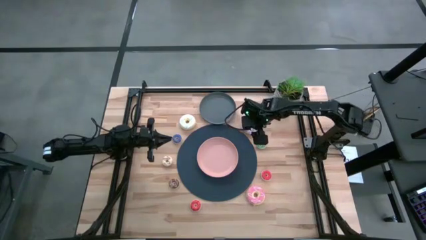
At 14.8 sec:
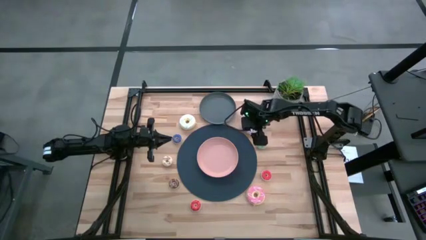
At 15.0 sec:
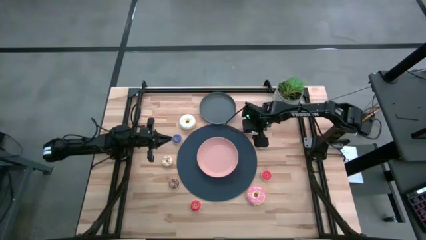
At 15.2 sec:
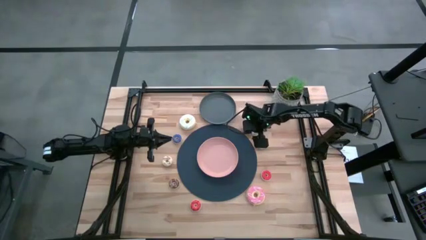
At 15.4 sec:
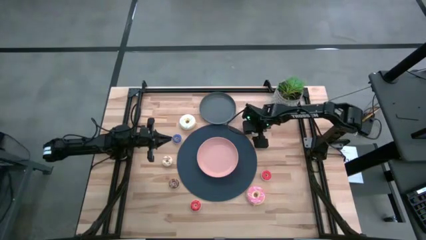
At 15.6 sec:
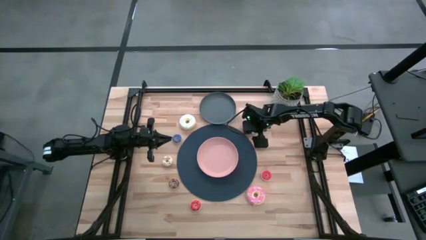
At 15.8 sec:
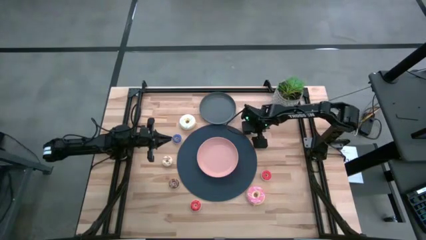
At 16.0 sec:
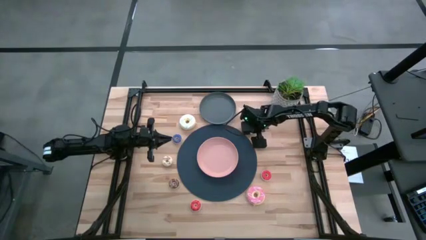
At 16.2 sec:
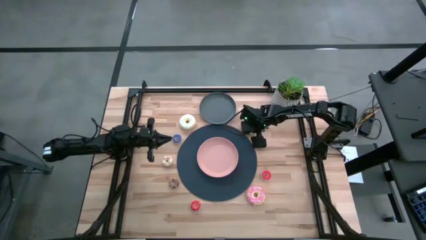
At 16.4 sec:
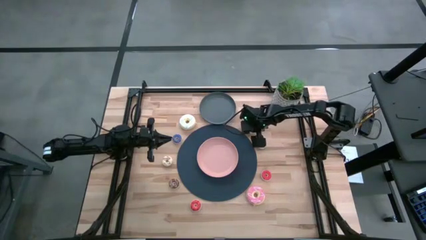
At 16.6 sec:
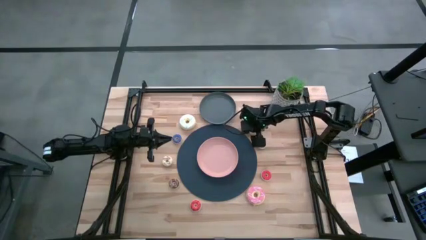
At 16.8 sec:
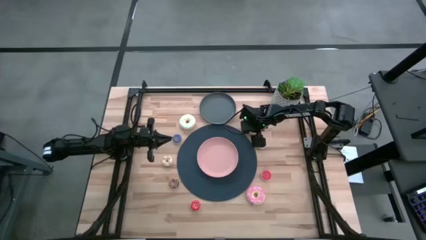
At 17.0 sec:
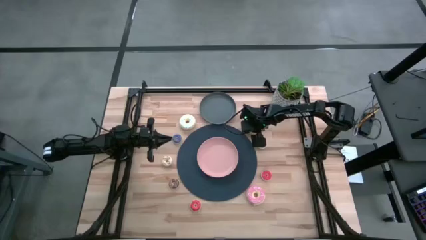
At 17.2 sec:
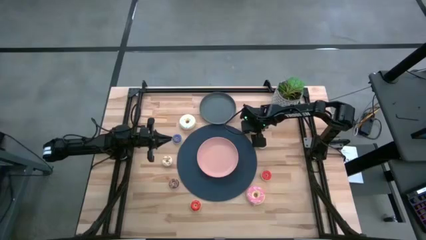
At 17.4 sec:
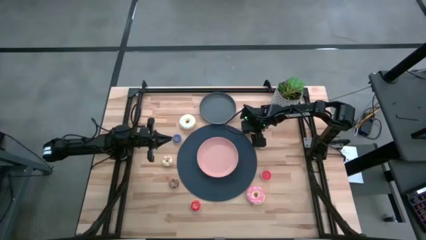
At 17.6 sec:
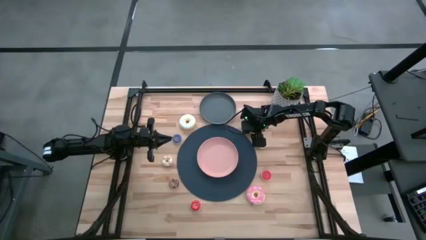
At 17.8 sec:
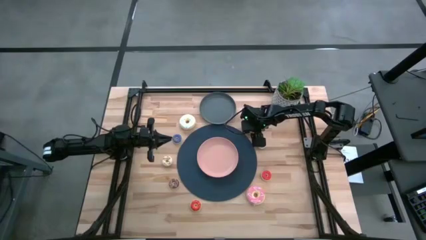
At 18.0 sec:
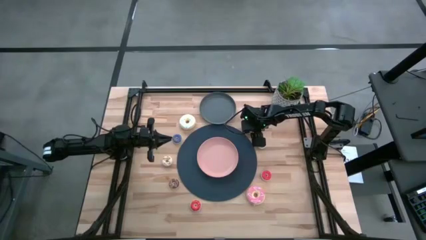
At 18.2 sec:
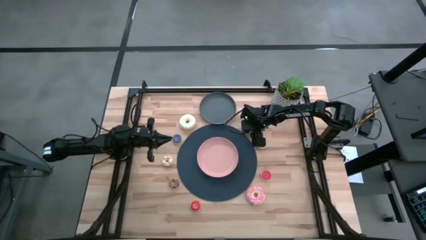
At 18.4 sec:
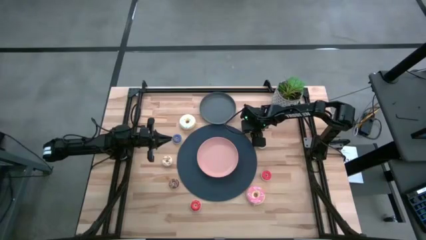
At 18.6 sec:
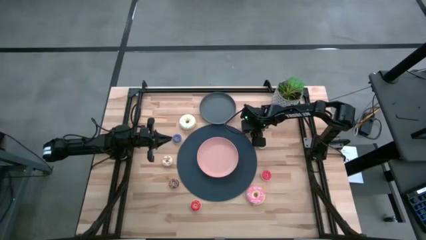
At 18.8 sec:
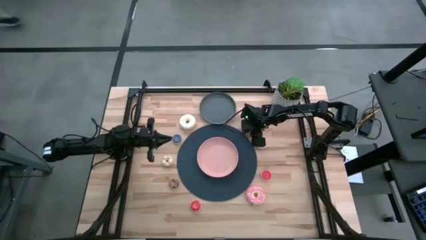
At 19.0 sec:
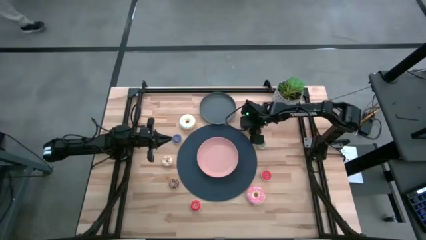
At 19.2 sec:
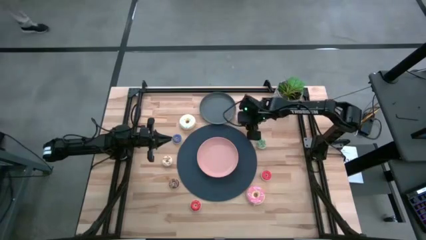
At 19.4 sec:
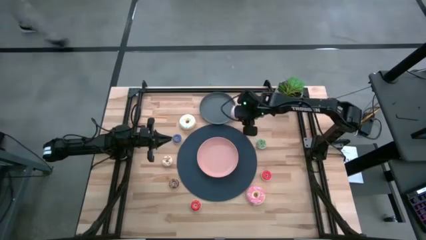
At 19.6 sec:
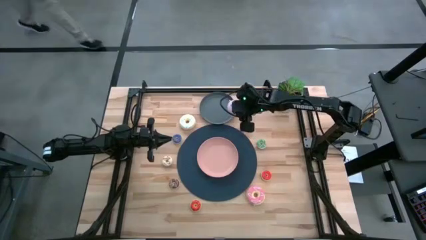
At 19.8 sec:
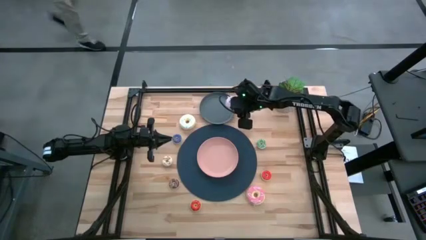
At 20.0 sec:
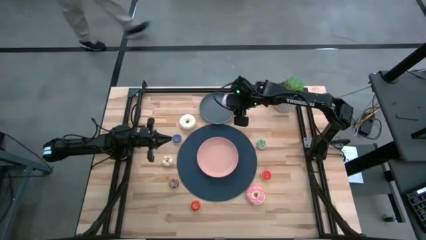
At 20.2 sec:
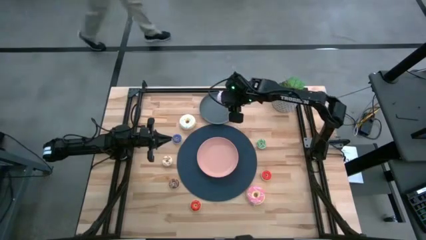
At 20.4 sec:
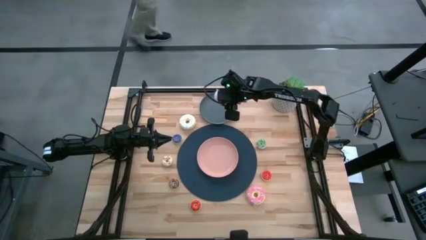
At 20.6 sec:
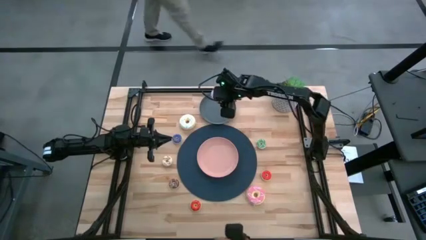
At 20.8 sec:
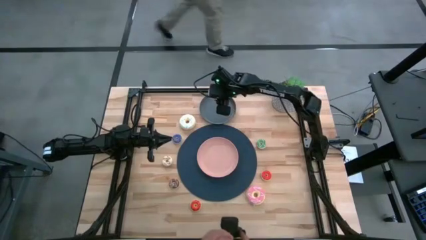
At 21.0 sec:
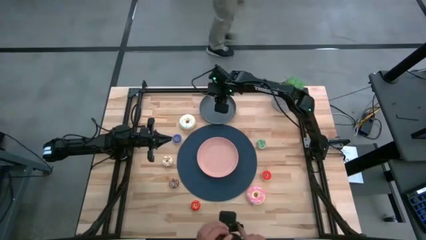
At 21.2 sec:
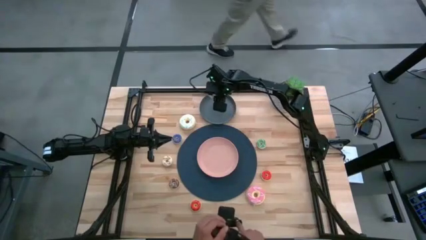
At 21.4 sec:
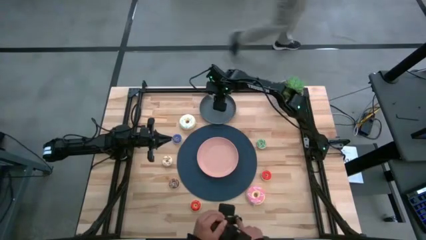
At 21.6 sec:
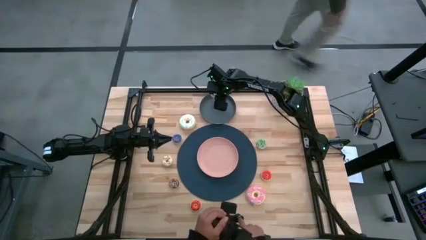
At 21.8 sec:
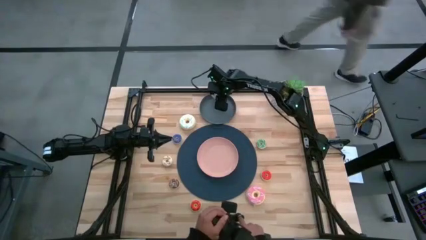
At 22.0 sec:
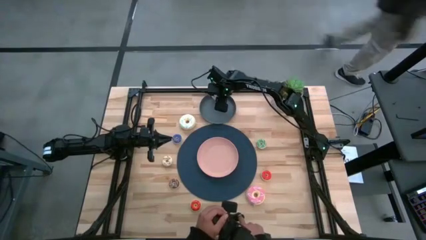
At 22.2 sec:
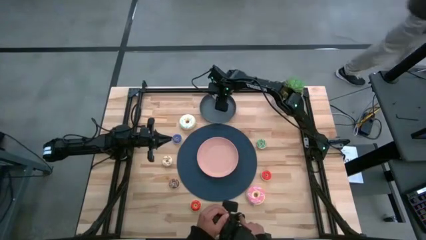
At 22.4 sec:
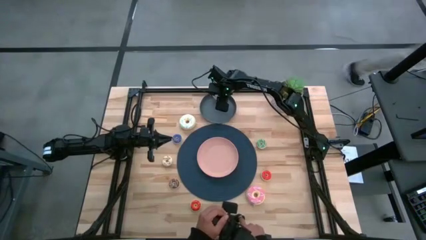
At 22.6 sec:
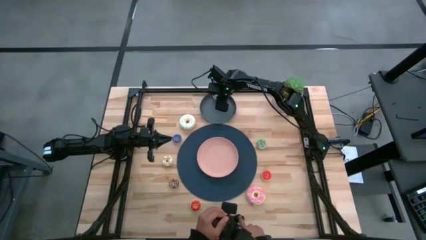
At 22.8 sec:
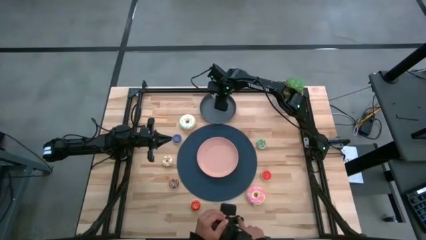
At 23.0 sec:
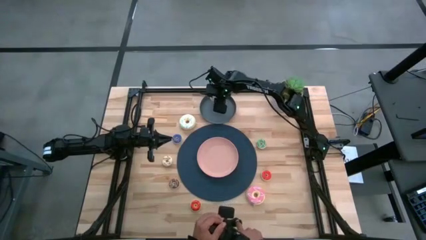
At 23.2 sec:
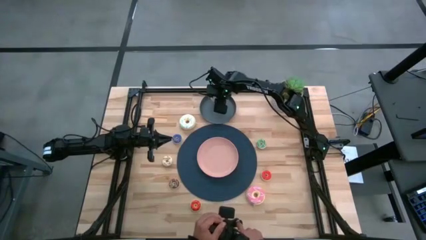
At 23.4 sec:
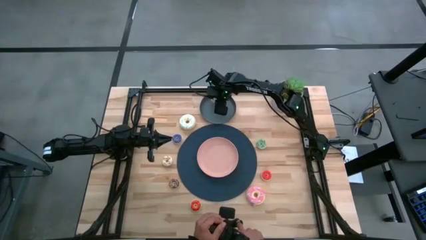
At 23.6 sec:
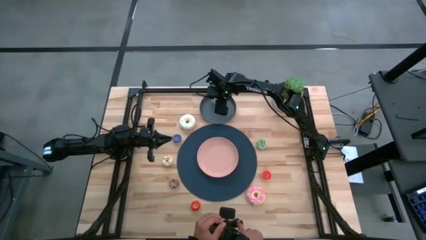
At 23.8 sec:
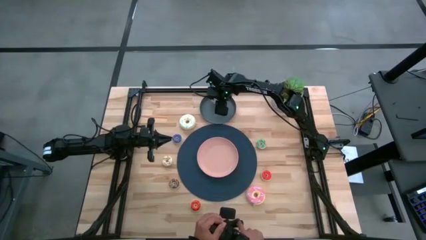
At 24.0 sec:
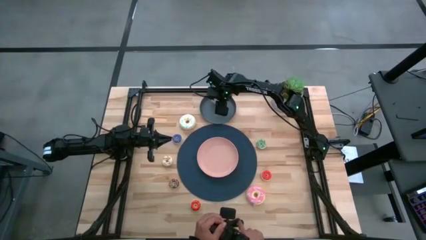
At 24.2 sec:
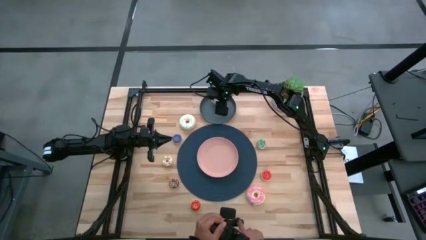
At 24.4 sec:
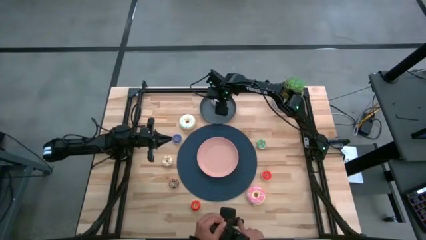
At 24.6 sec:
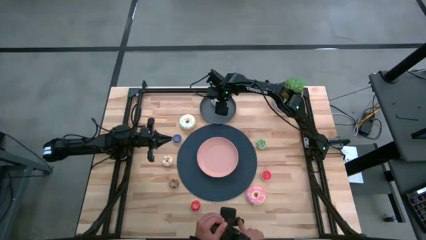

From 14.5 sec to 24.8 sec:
Task: Pick & Place donuts
Put the large purple donut on the gray plate

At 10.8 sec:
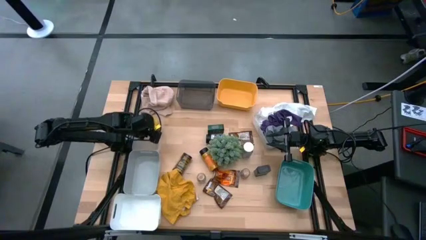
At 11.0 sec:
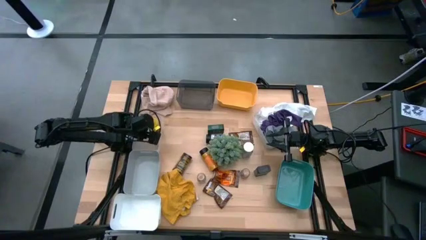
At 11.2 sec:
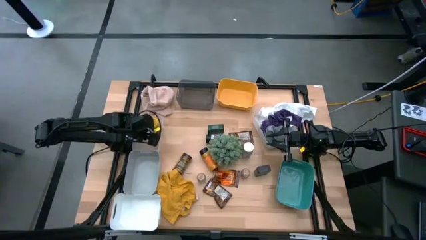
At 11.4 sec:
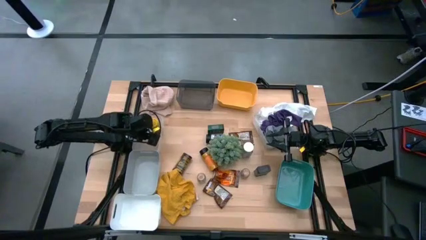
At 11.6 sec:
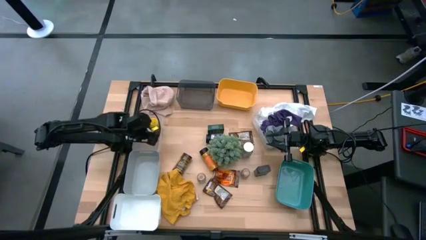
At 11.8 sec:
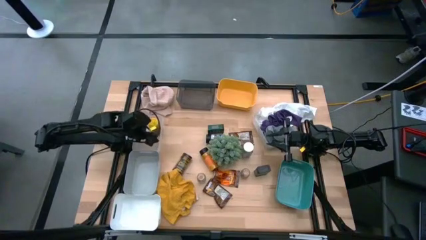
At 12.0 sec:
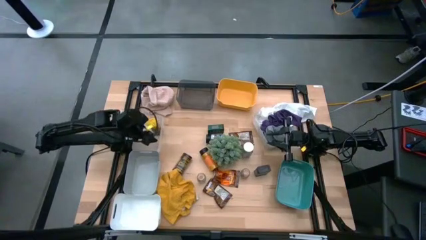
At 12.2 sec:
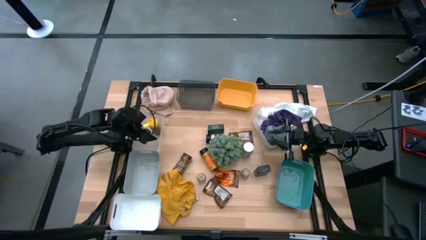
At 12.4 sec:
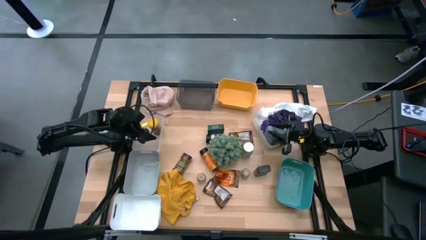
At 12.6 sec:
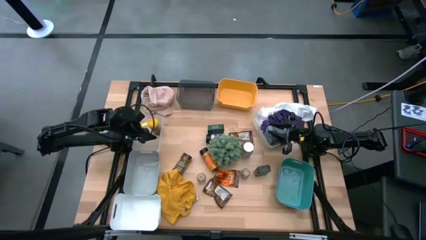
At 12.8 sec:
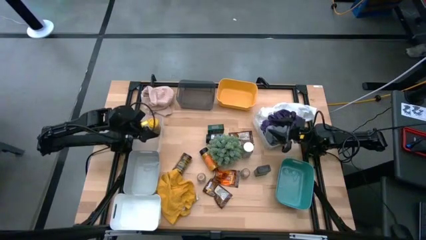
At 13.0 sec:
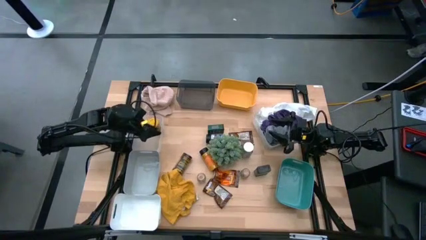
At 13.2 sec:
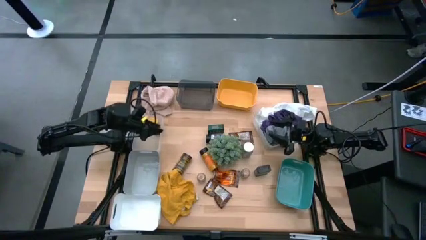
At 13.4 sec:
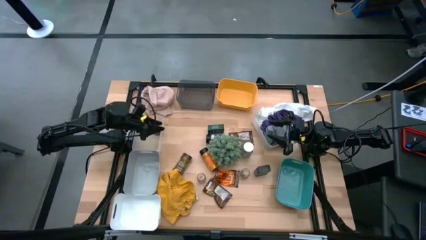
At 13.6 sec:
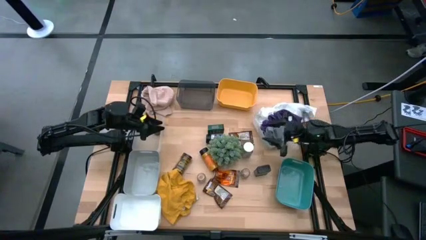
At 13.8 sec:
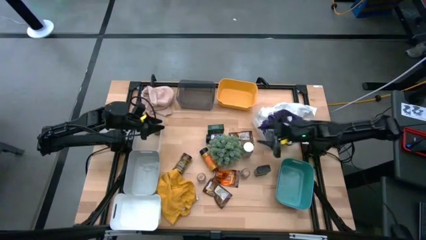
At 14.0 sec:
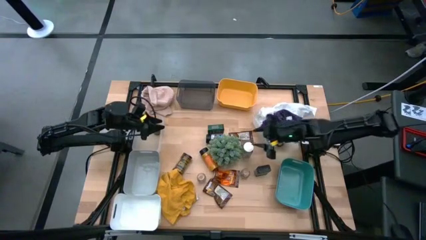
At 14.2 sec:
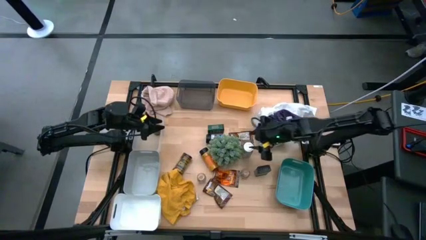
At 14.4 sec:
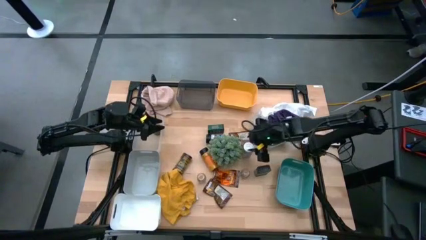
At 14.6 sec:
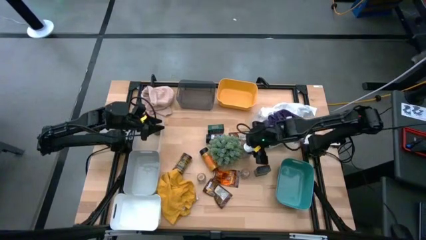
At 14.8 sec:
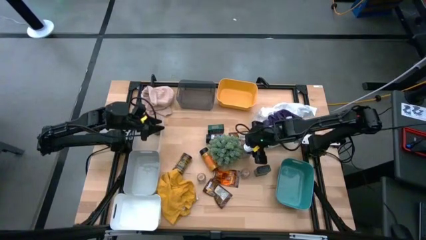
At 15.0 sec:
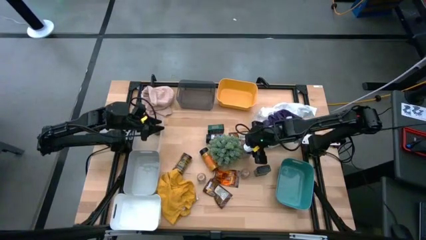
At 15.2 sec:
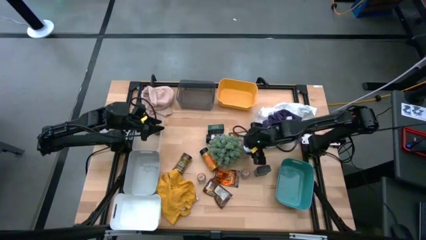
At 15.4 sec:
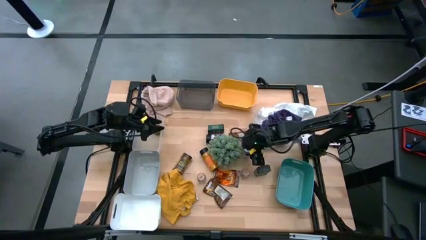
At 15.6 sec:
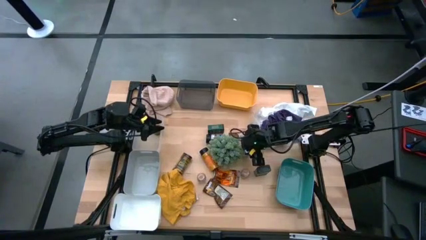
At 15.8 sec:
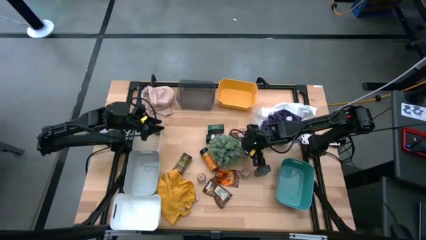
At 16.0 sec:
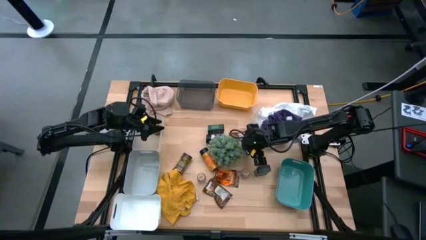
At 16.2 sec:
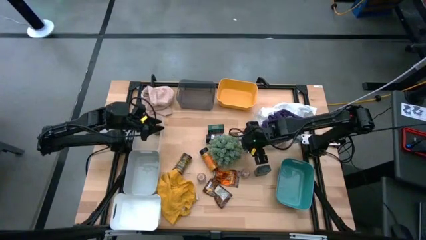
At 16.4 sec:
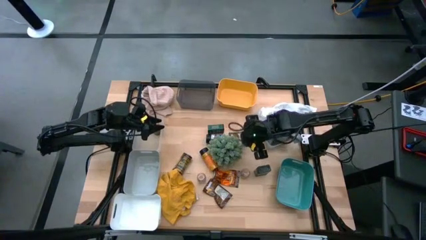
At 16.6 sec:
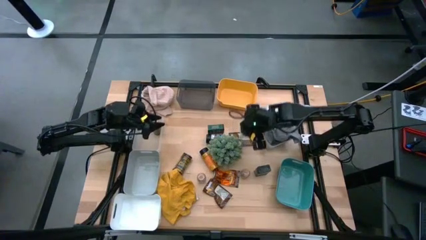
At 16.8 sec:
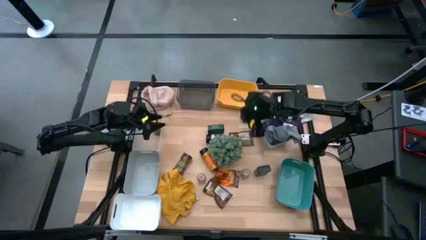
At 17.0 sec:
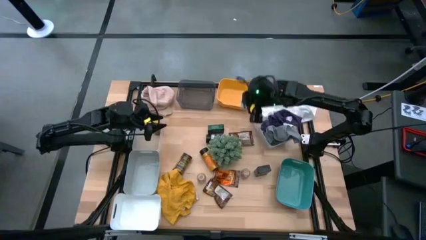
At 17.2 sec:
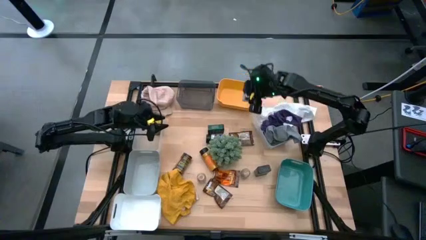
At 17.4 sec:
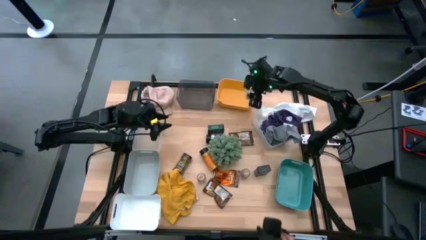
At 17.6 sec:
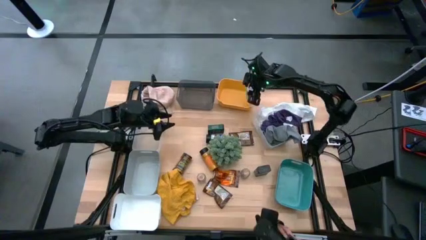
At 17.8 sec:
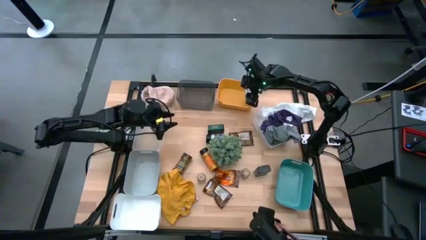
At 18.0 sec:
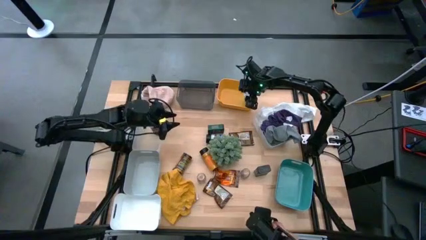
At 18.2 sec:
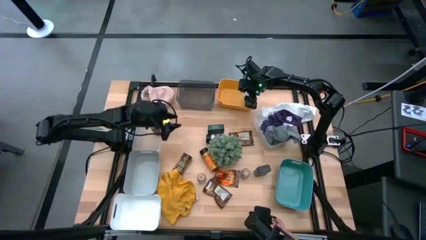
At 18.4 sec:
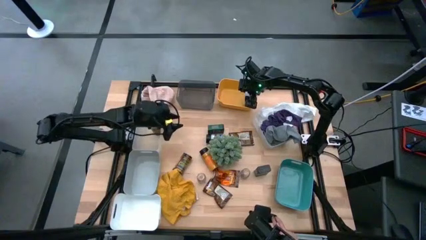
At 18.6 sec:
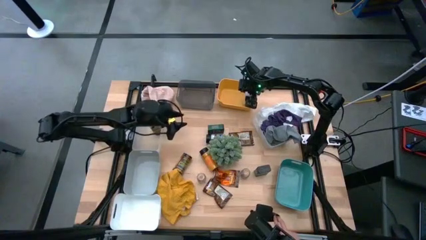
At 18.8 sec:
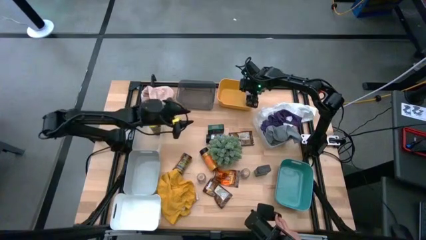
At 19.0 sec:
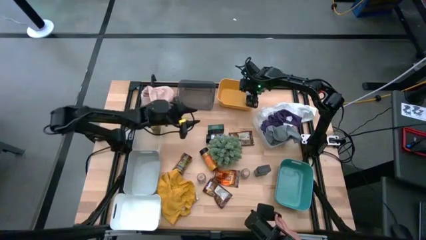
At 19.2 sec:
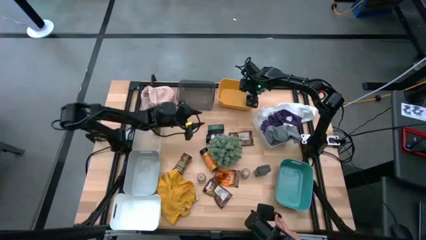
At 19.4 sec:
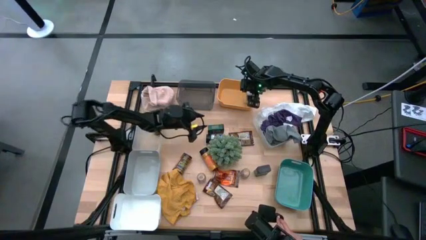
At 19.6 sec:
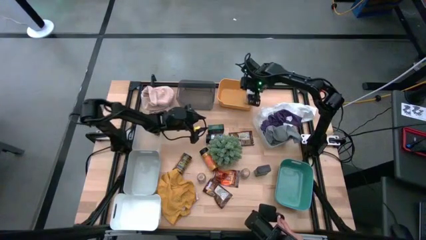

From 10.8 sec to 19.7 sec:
Task: Sort spices by type
Put the white spice bottle into the yellow bin
